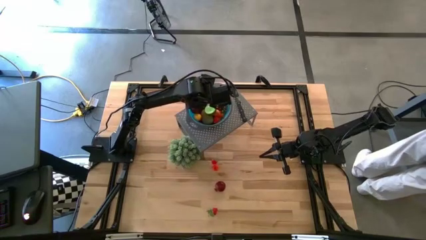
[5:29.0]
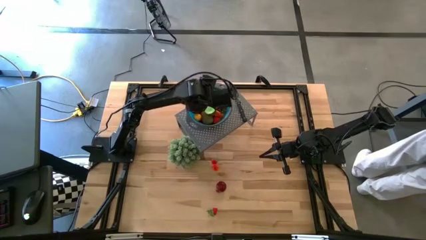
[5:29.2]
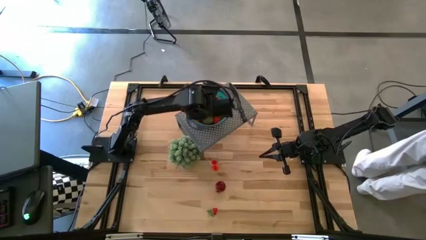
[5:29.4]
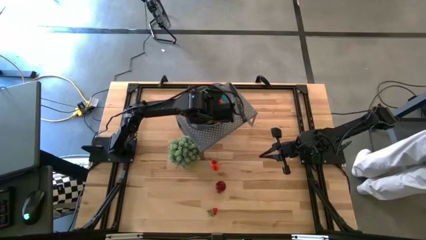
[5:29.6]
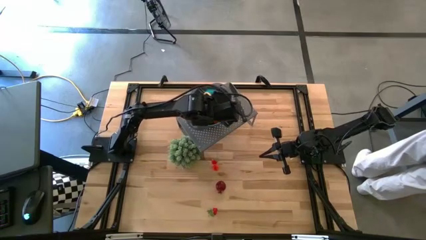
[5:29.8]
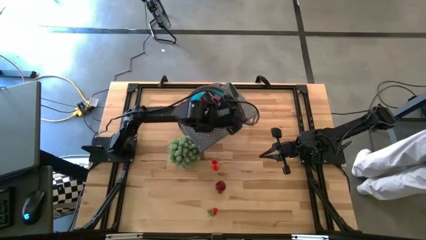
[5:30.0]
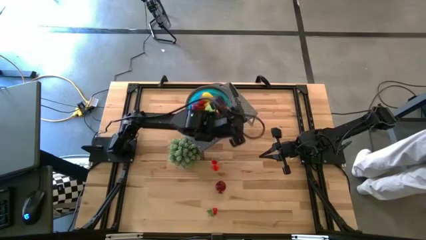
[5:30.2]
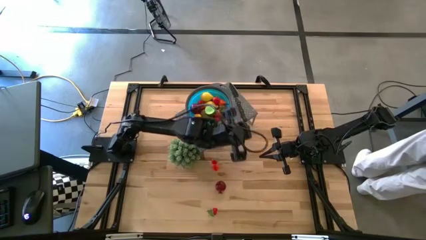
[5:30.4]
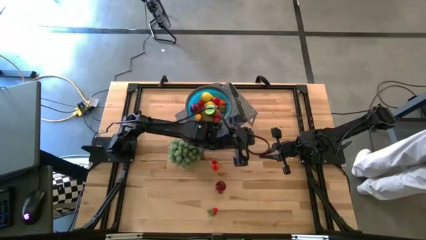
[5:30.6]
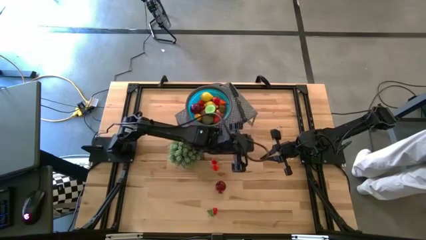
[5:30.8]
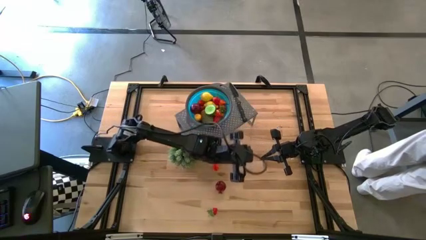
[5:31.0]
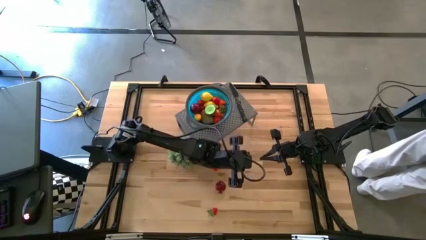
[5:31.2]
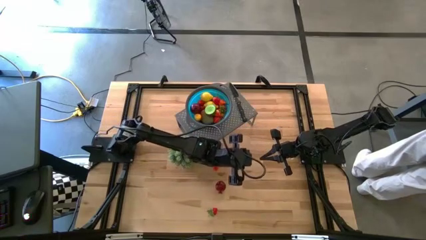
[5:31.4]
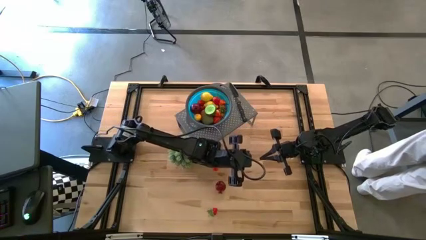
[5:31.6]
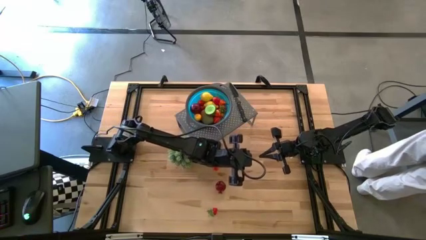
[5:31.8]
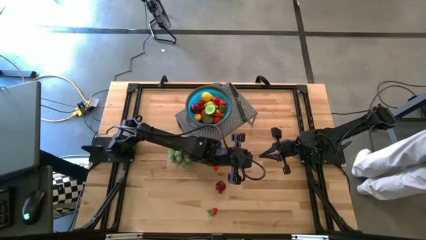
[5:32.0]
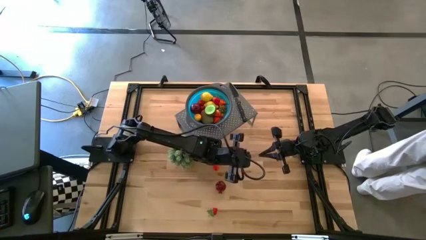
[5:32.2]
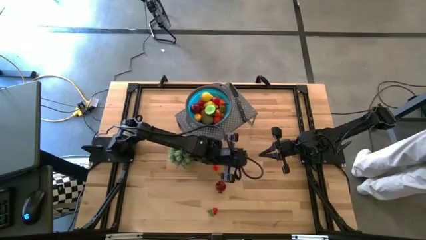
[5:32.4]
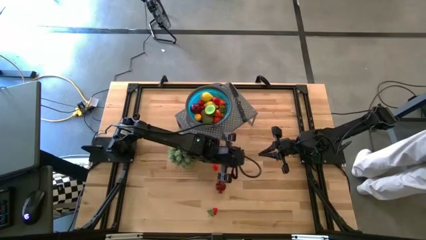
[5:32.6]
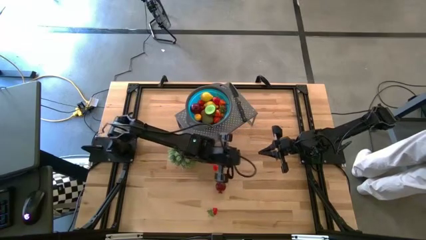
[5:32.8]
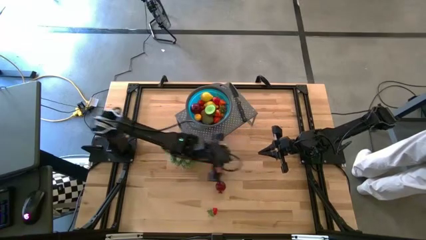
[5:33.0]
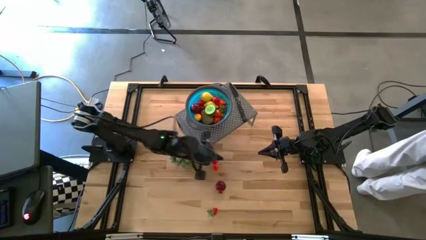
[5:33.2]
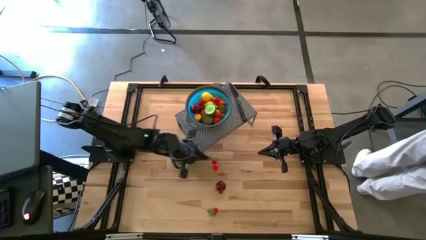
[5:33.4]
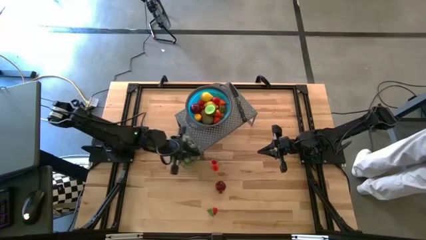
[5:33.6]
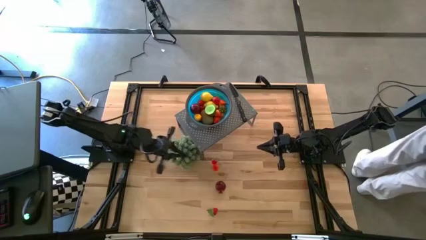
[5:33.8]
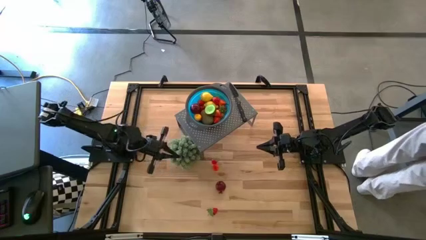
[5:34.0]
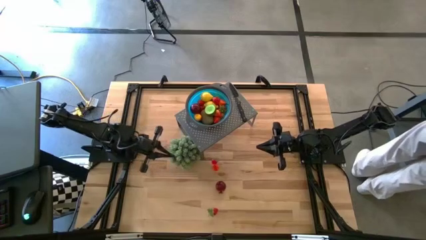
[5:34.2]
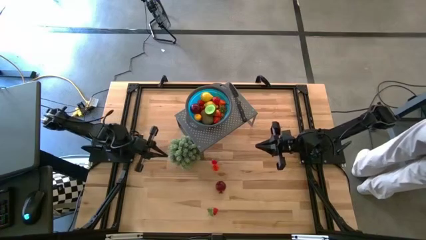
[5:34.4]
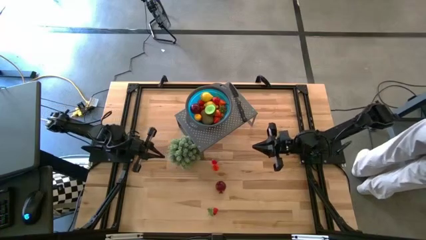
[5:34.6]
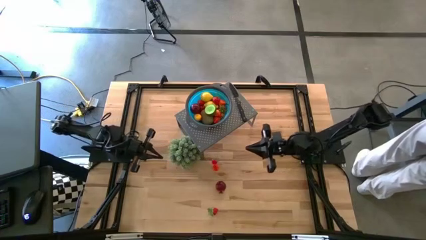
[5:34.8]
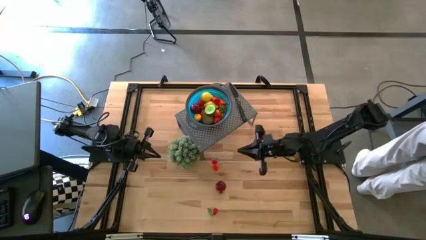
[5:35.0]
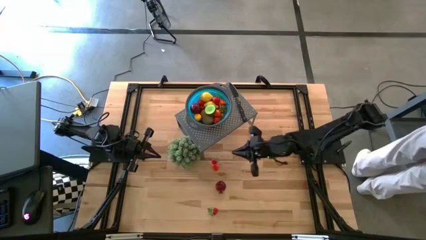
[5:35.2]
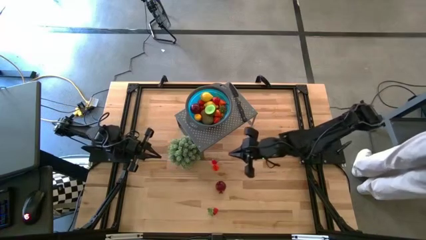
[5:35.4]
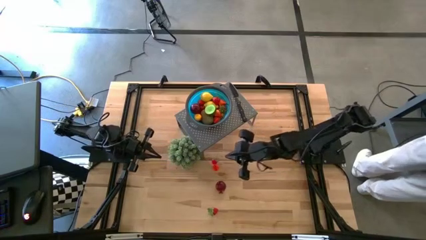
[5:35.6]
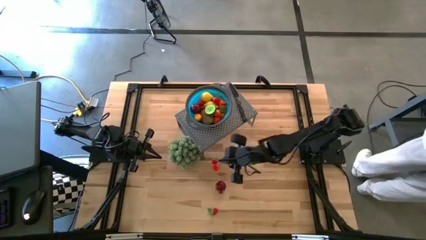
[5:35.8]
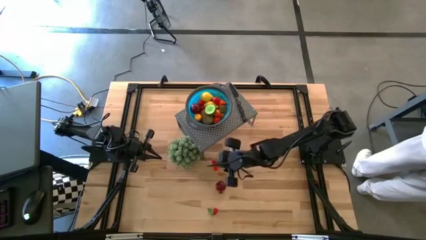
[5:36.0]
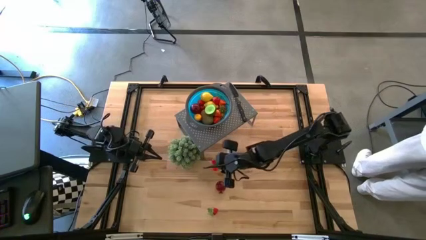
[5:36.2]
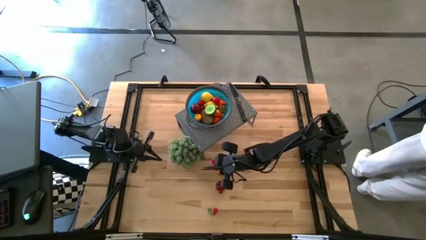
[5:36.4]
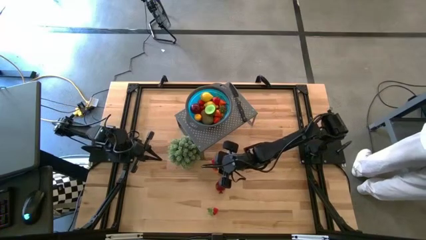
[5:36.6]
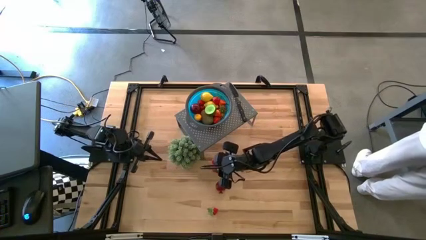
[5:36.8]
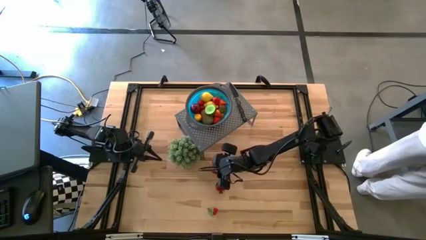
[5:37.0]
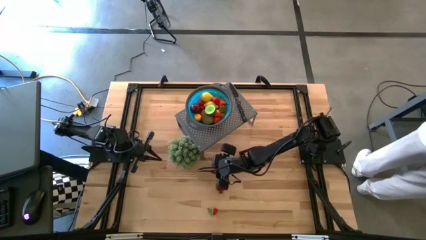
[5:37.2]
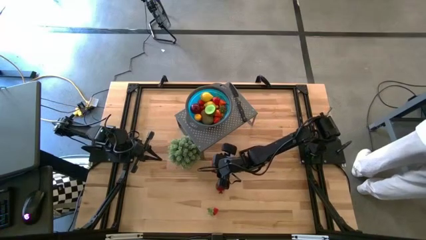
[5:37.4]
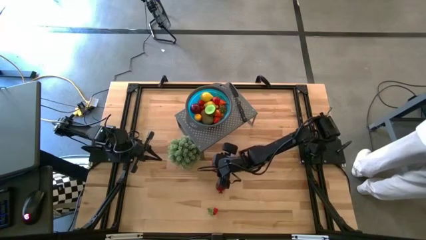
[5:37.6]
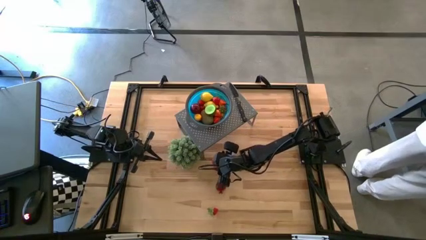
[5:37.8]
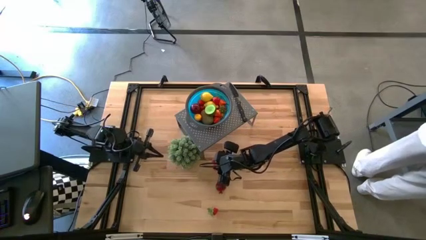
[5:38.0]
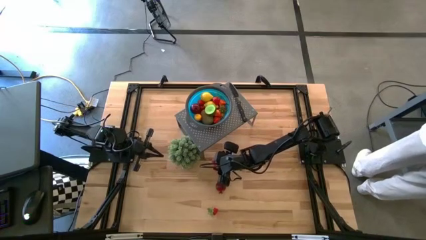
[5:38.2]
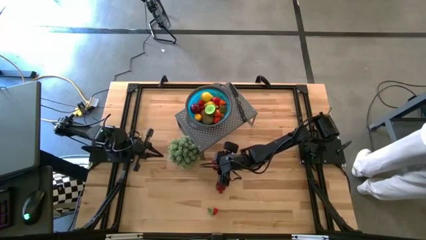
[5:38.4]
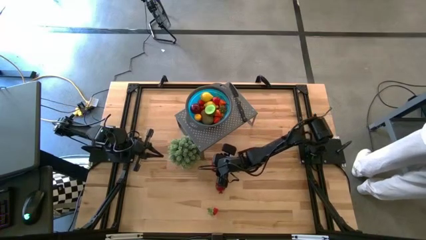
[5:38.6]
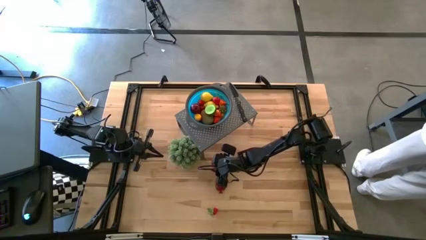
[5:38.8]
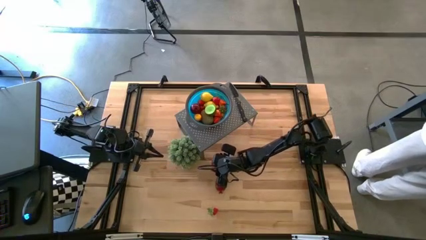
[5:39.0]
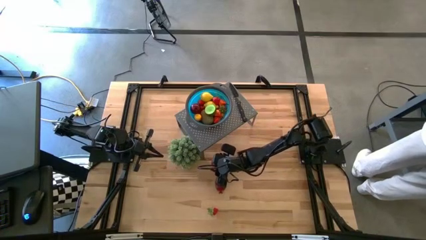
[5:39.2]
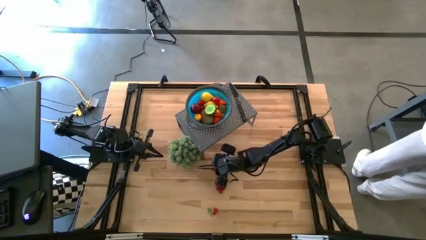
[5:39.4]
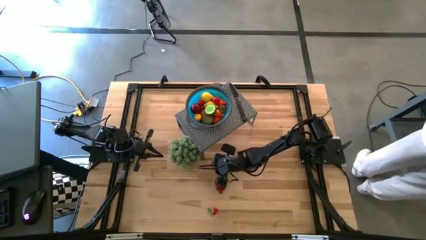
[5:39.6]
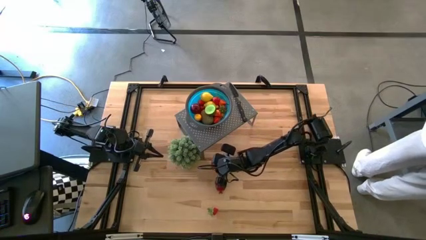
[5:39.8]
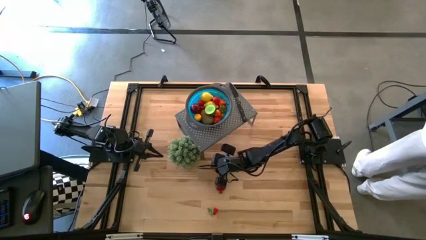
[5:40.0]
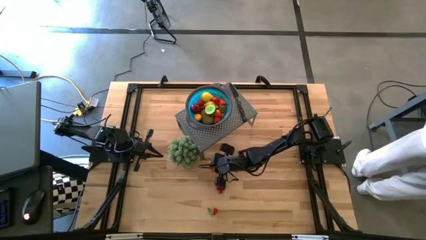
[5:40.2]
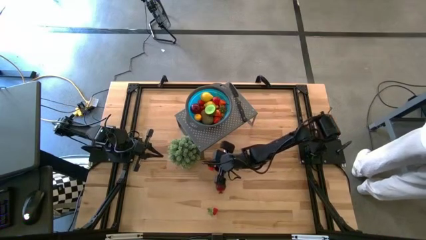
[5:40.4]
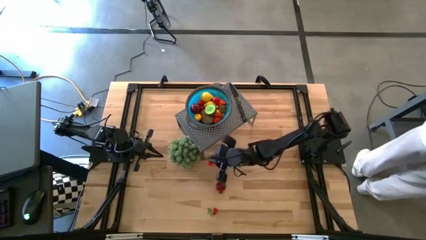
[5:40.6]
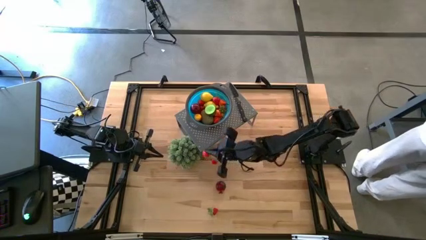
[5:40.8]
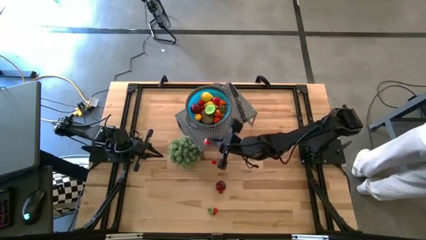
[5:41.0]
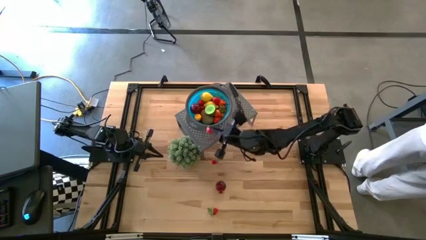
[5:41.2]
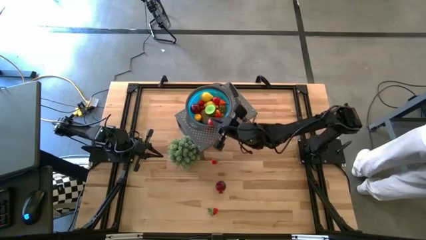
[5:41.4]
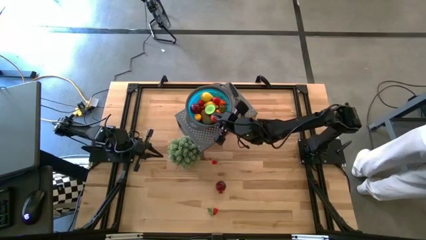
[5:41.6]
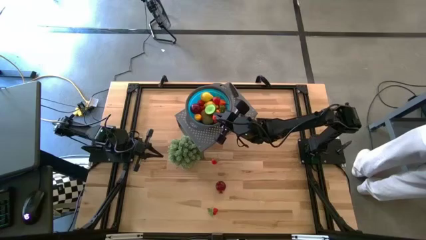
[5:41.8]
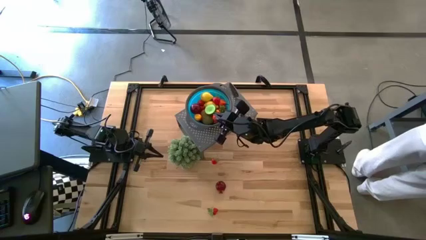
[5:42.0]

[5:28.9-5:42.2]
Task: Pick & Place Fruit
Put the pear into the blue strainer bowl on the shelf
